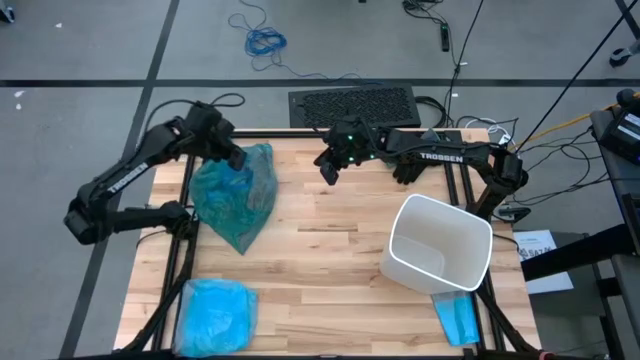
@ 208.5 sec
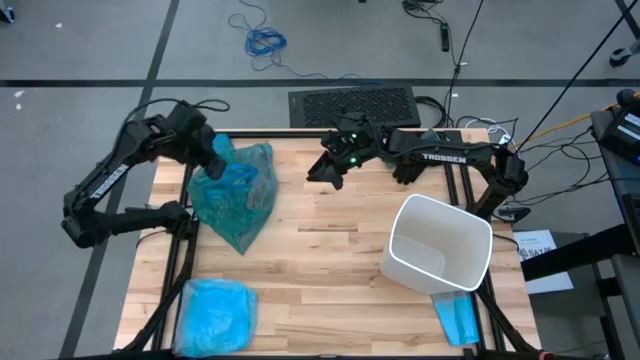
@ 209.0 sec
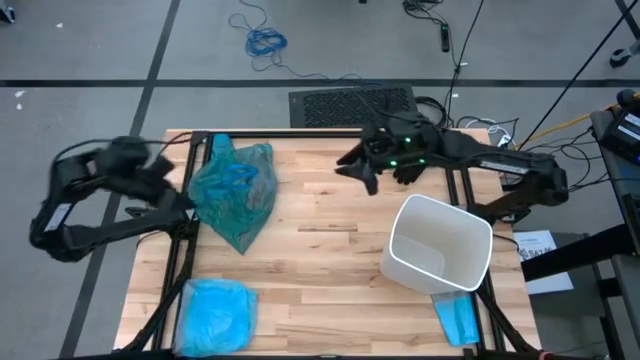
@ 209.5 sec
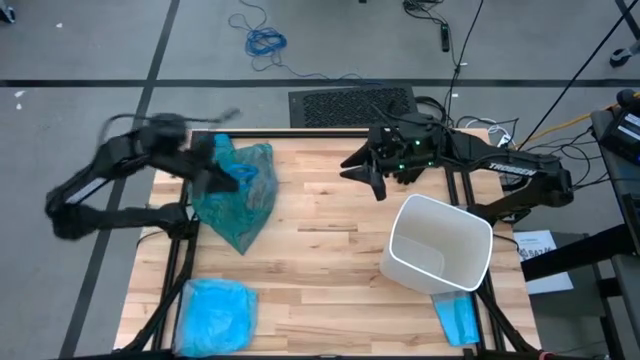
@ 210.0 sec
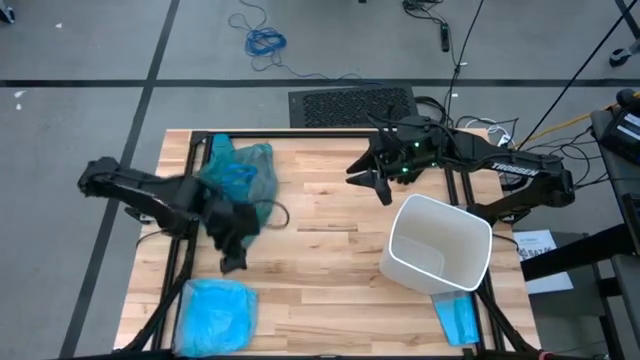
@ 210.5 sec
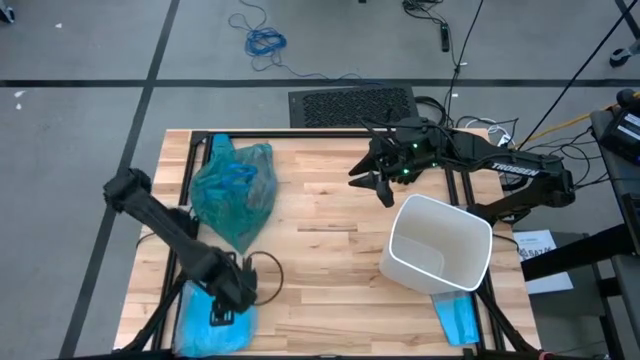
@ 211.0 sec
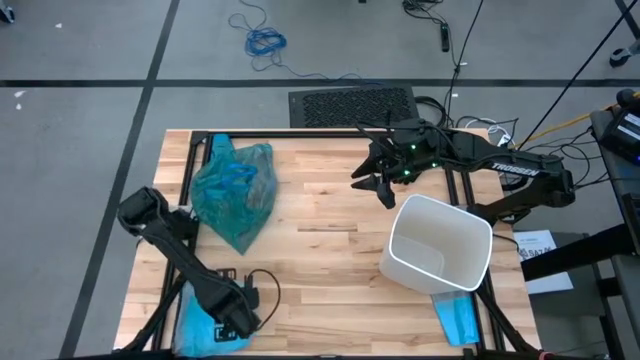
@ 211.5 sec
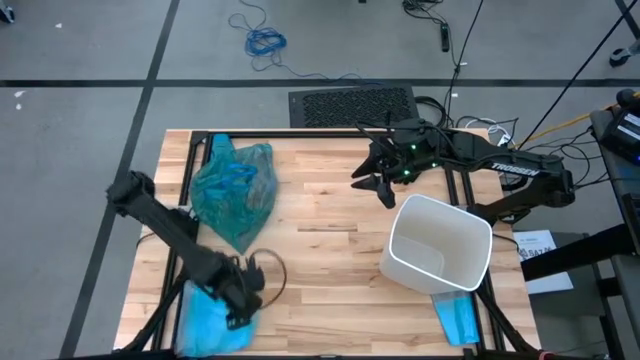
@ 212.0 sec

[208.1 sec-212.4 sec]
Task: place trash/remove bag and relplace
Insert the new blue trash bag into the trash bin

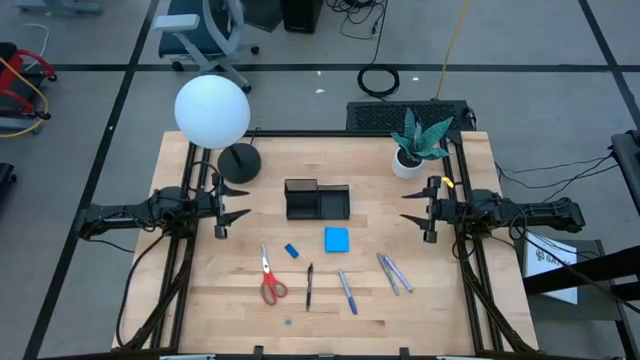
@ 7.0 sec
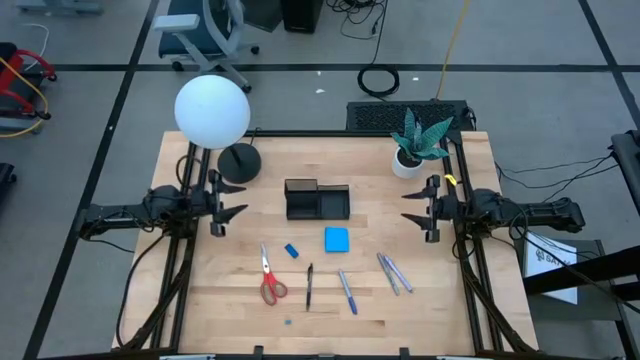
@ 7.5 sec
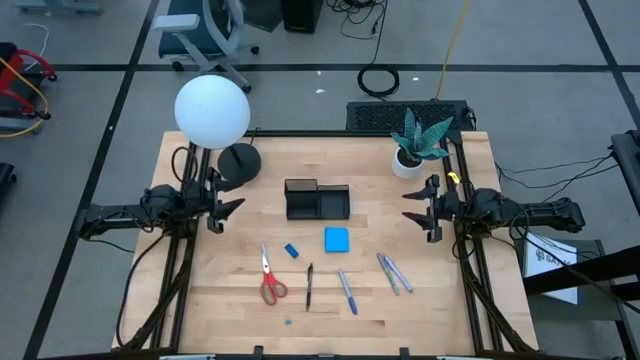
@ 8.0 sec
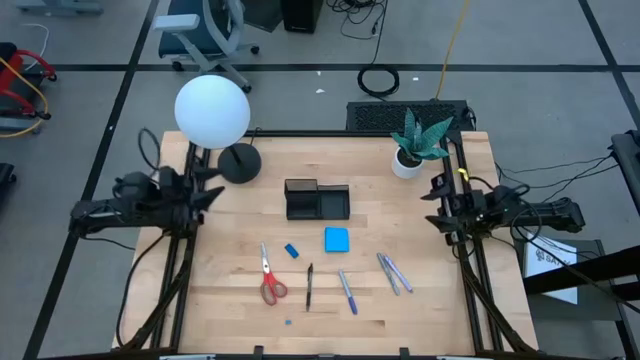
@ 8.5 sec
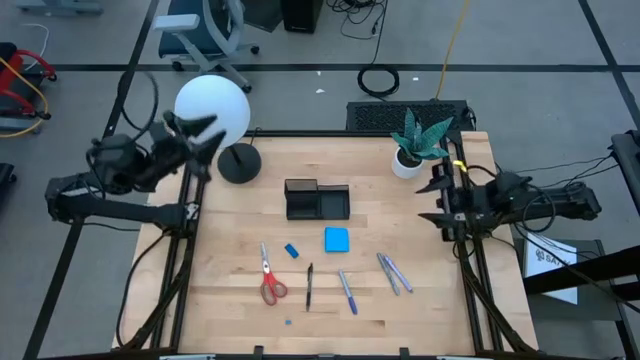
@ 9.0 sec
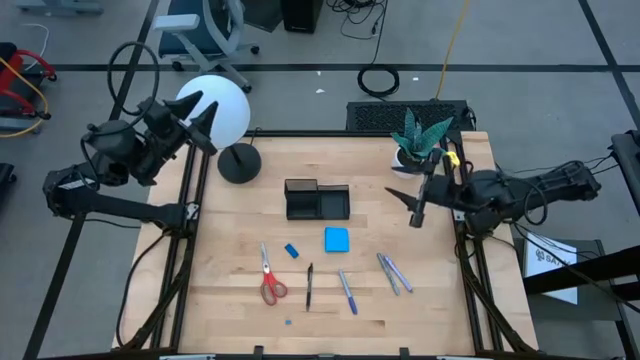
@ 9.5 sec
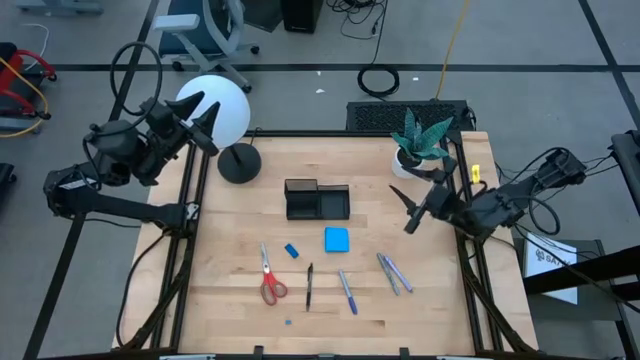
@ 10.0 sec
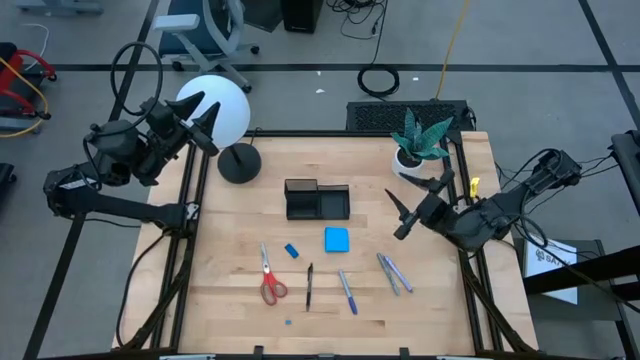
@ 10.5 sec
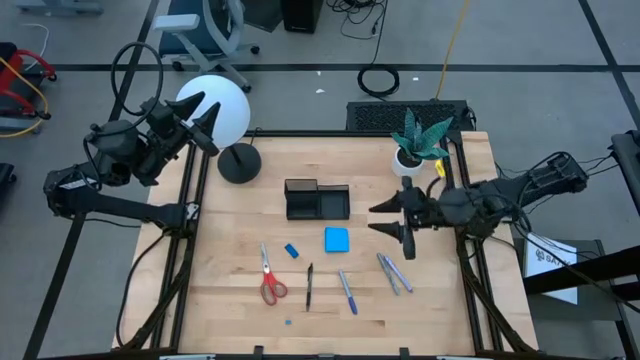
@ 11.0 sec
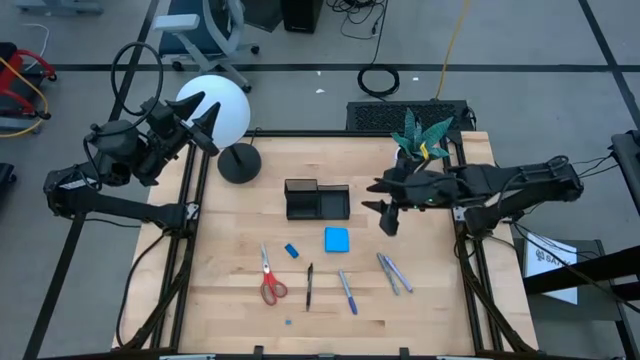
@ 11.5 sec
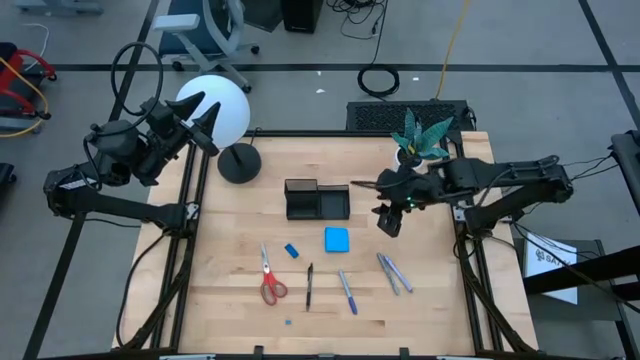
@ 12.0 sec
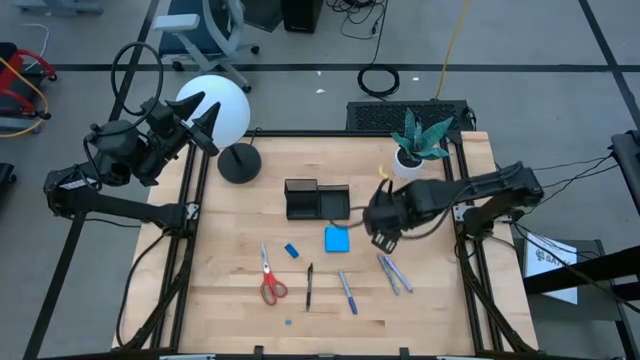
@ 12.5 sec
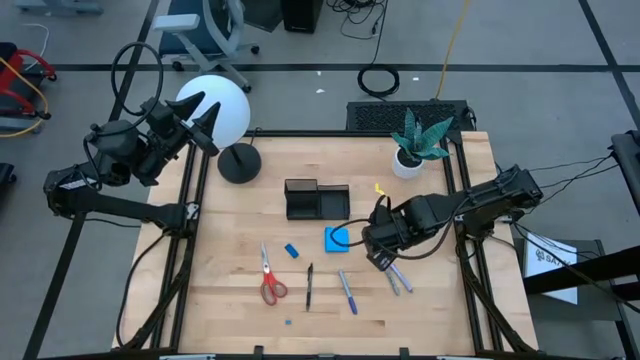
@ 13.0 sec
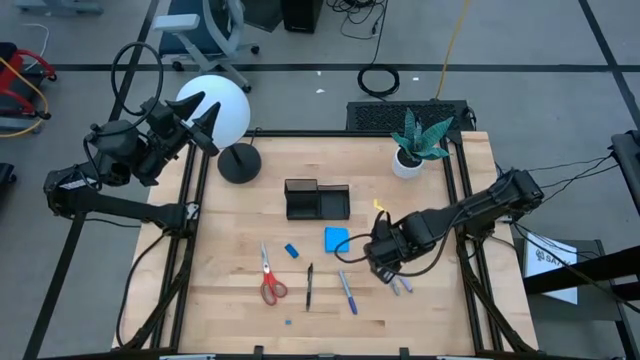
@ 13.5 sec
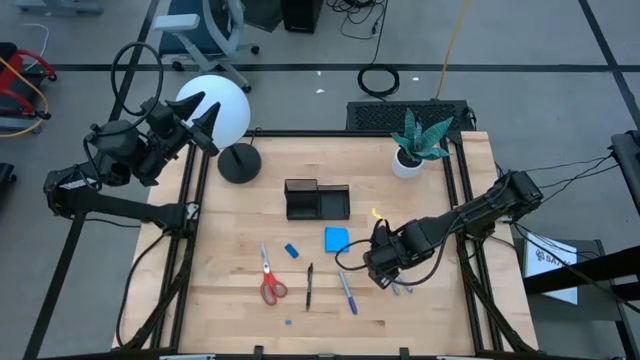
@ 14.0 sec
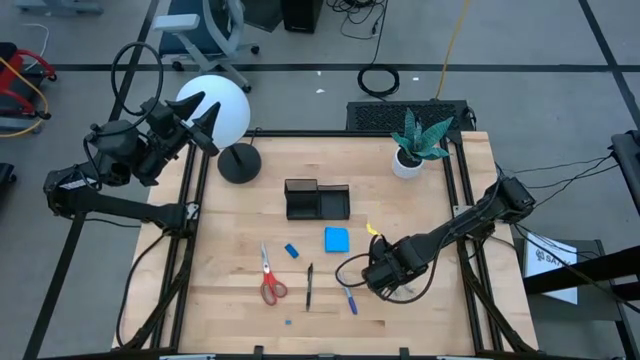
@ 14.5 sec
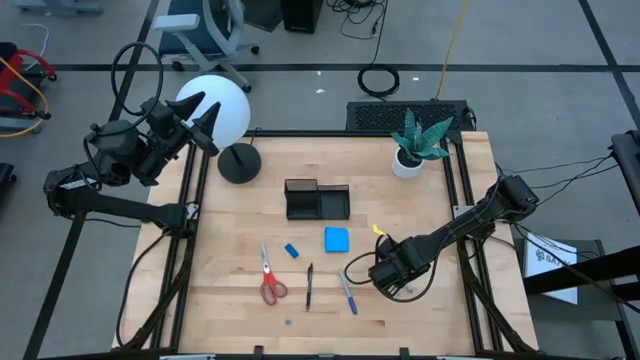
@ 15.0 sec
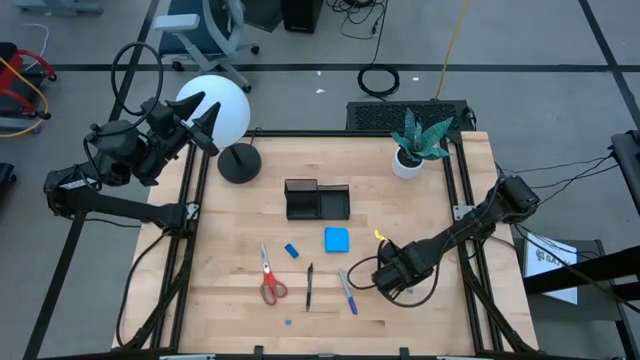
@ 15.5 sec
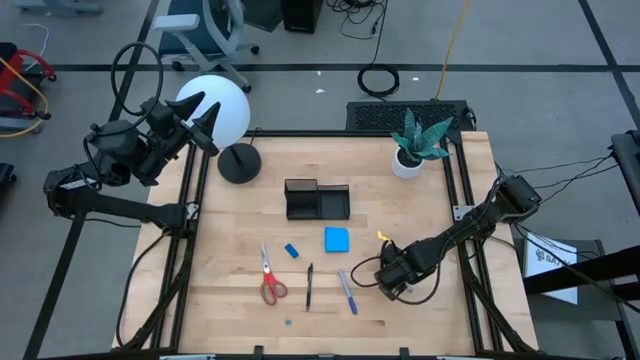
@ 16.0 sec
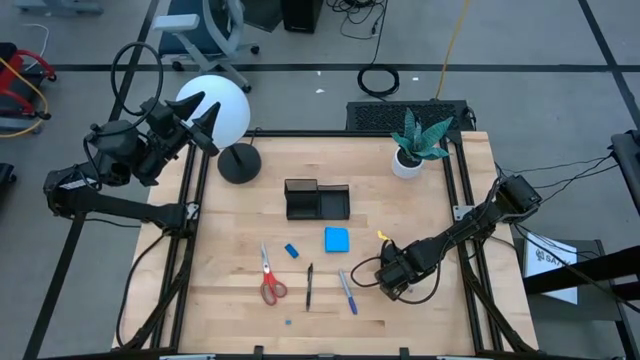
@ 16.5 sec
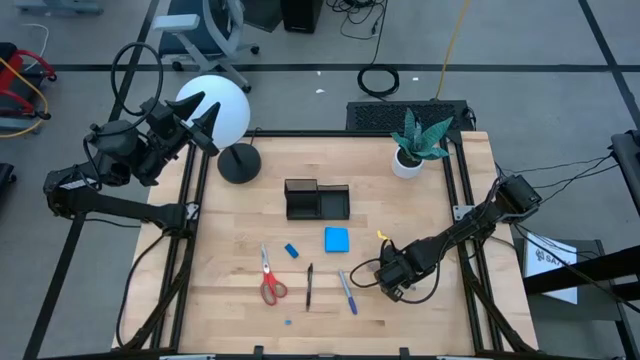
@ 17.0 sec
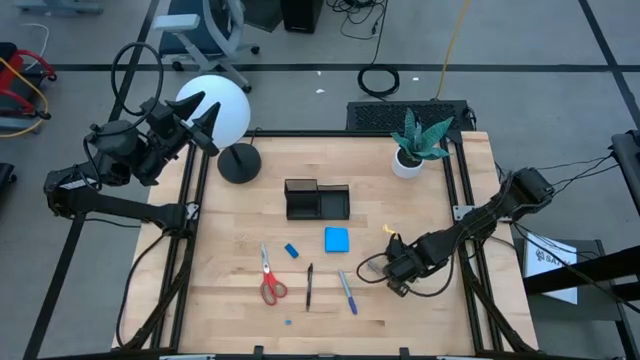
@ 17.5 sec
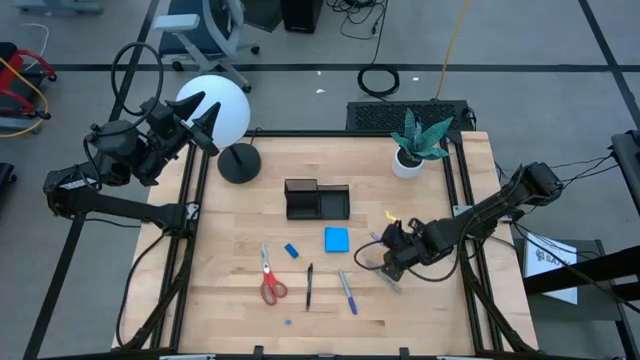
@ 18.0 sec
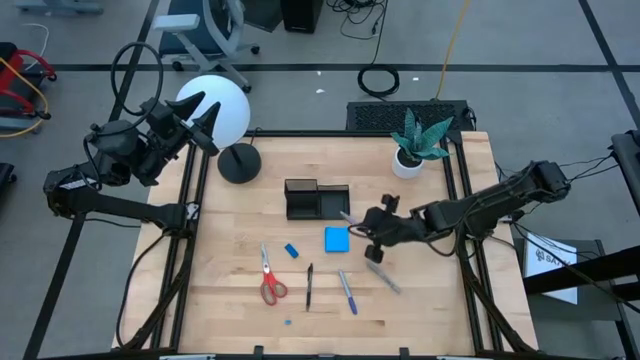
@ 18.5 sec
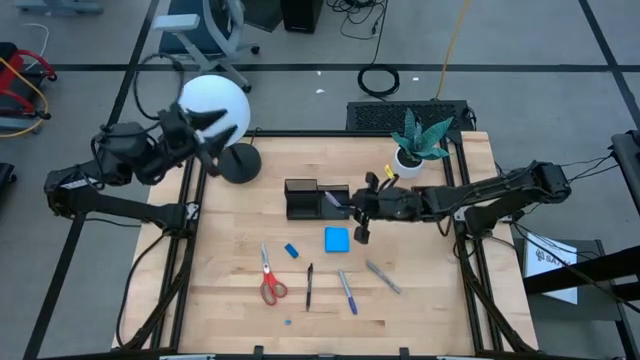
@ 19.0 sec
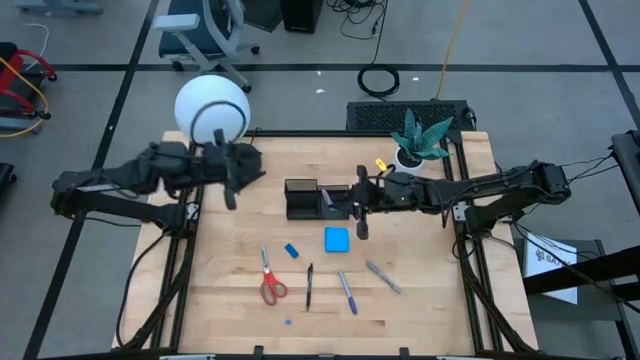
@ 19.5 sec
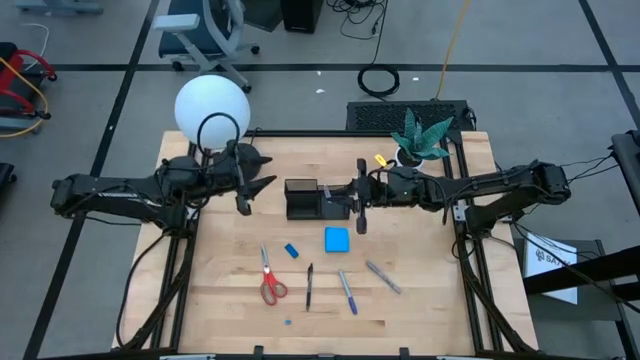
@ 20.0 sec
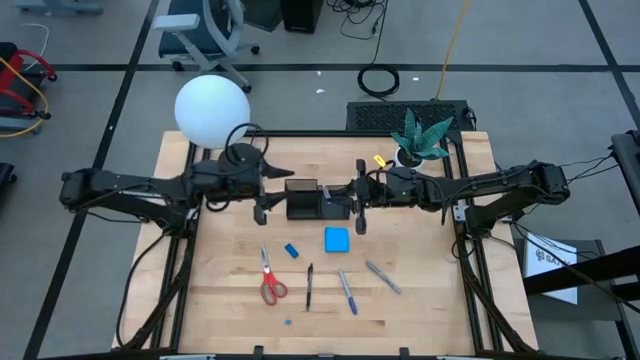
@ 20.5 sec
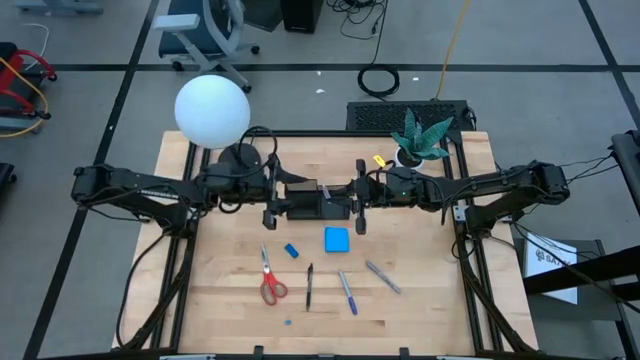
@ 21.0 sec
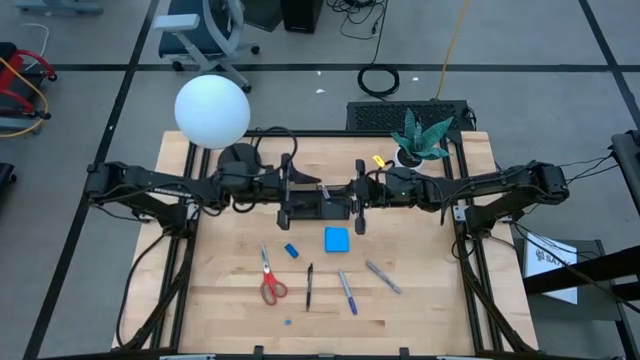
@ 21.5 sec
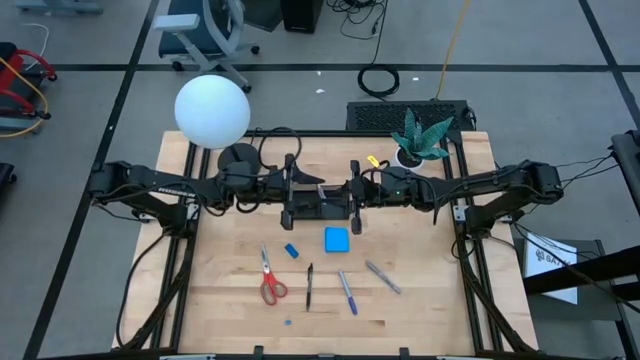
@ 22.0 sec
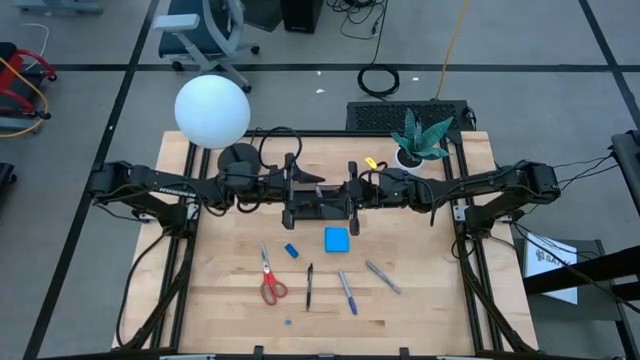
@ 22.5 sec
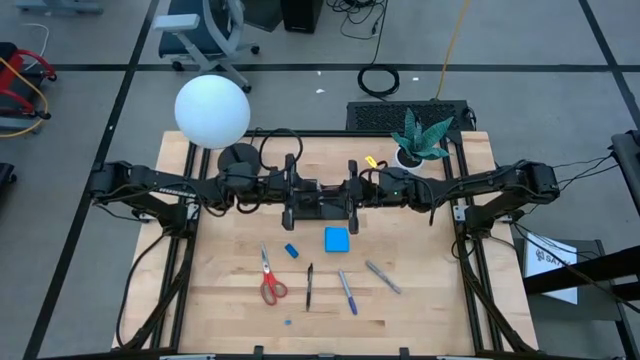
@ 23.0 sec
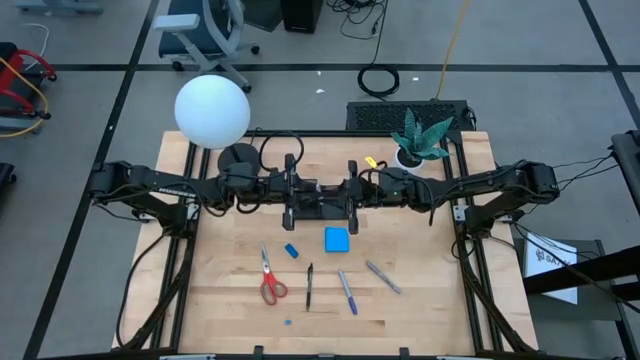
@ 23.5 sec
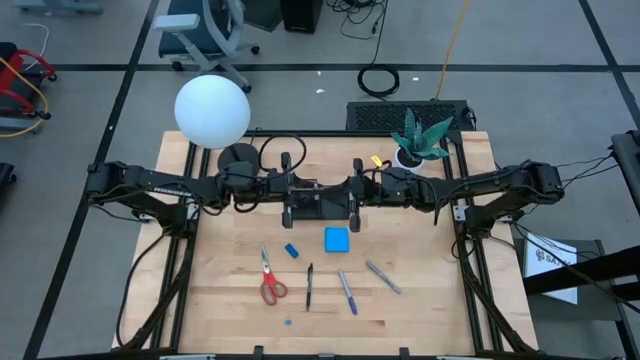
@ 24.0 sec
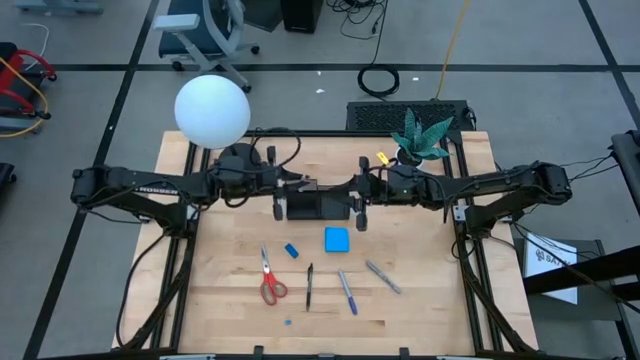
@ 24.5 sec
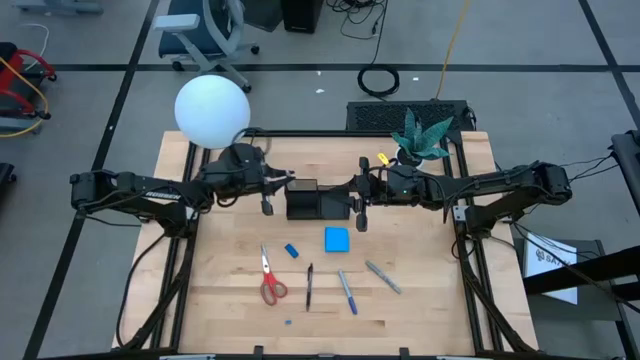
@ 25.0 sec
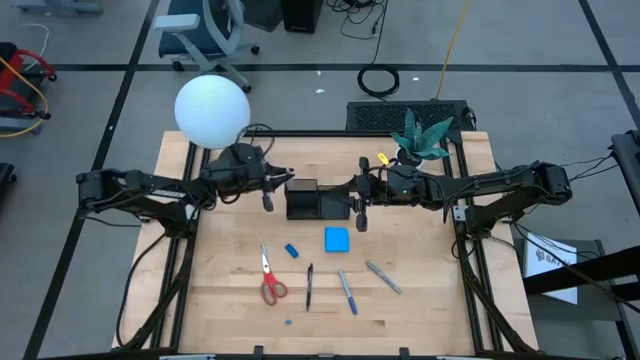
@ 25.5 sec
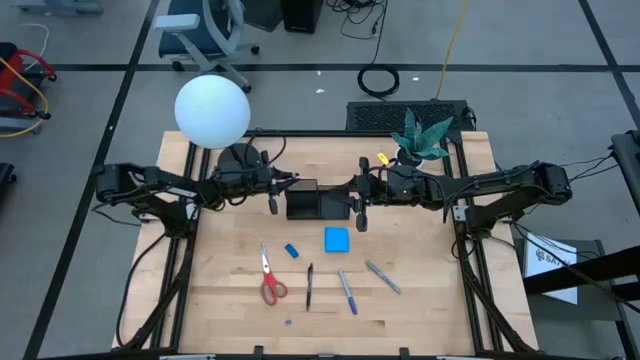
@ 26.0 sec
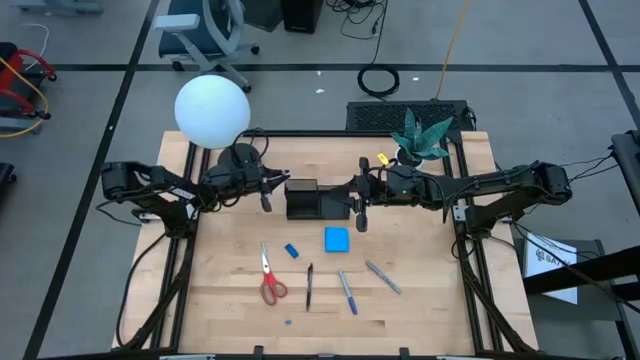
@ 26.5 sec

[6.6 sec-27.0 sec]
Task: Pick and place office supplies into organizer
Put the white pen into the black mesh organizer
